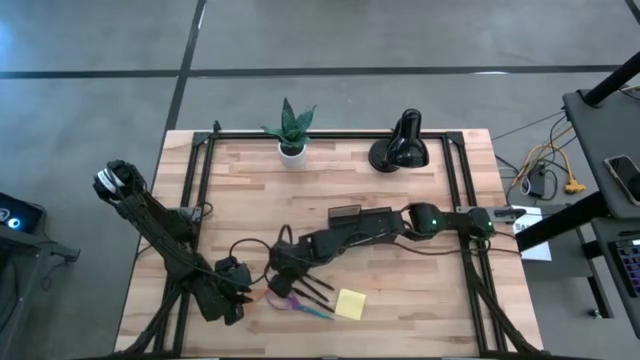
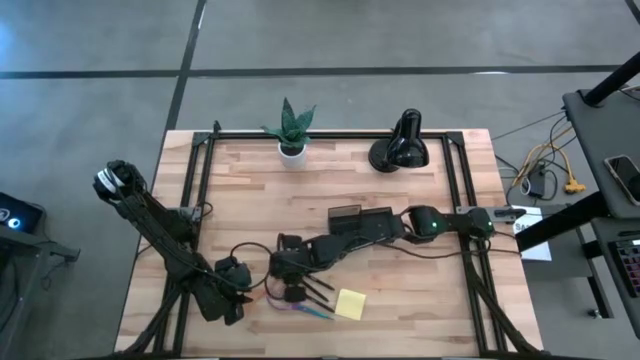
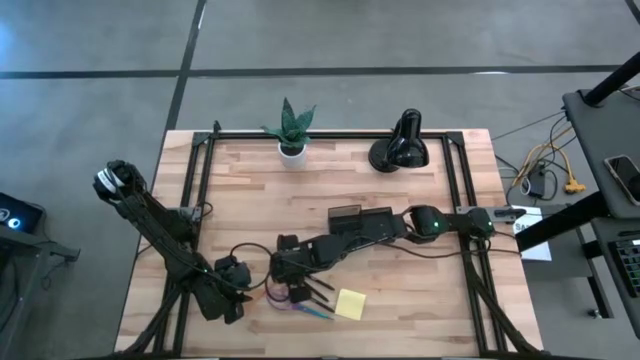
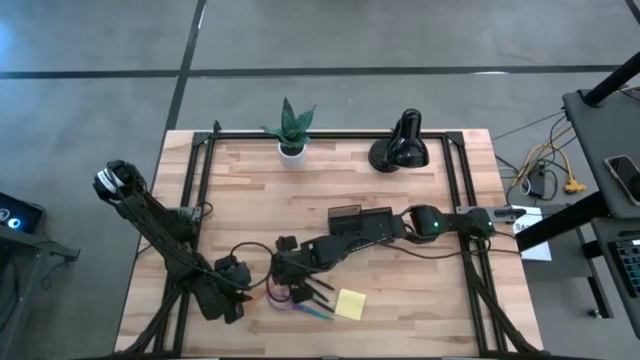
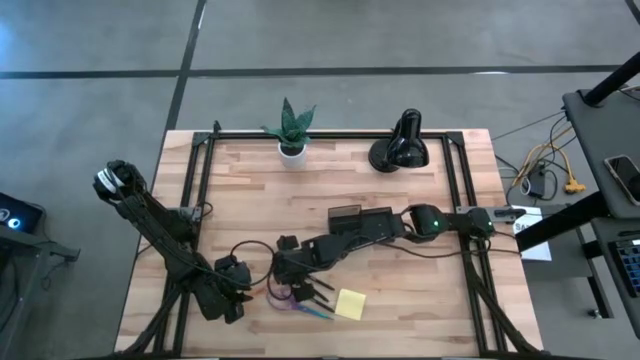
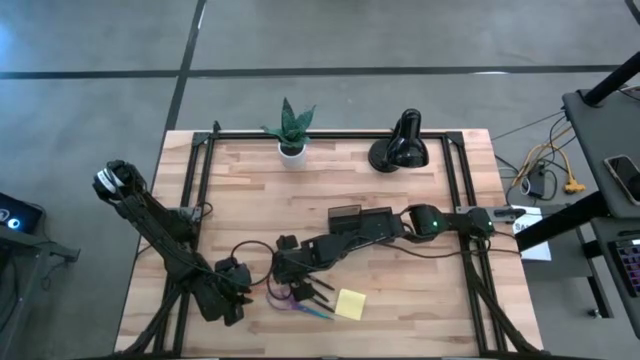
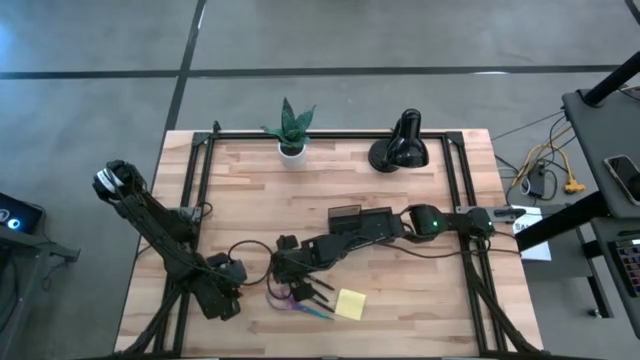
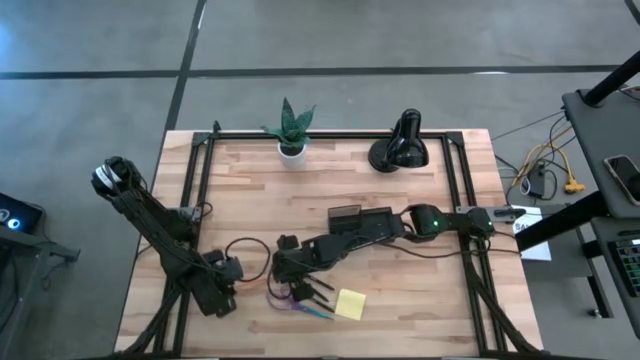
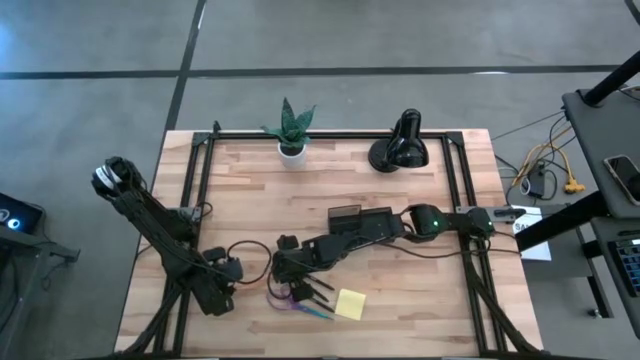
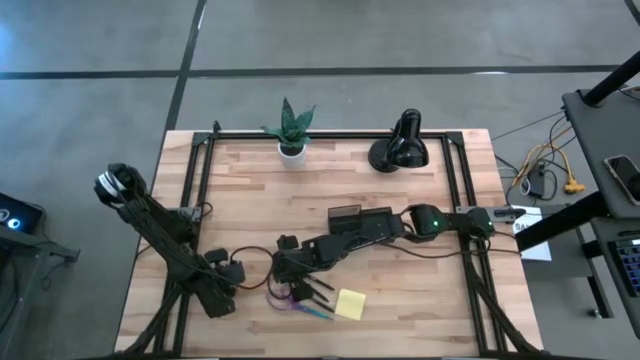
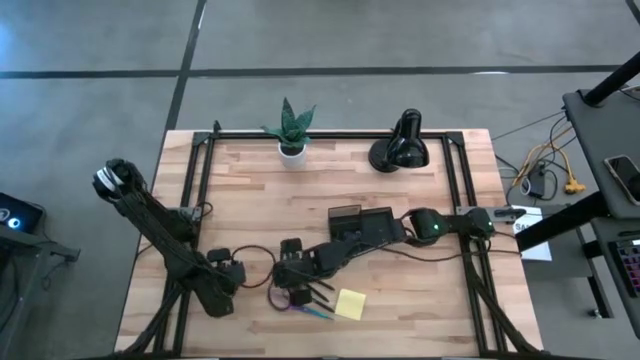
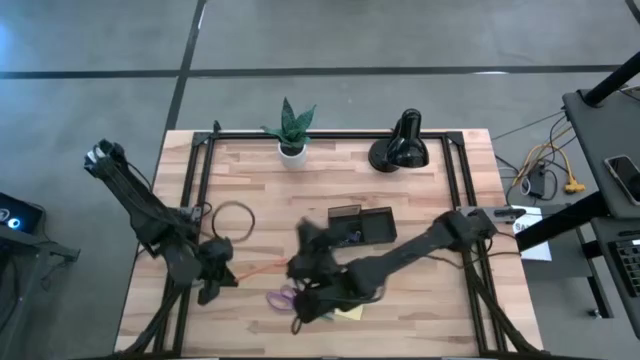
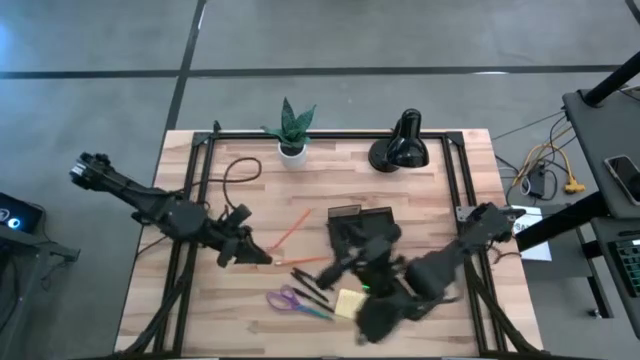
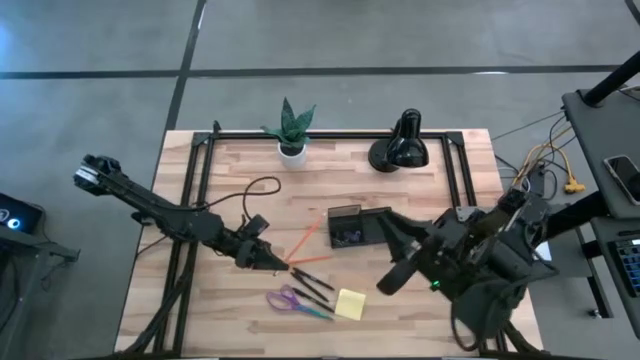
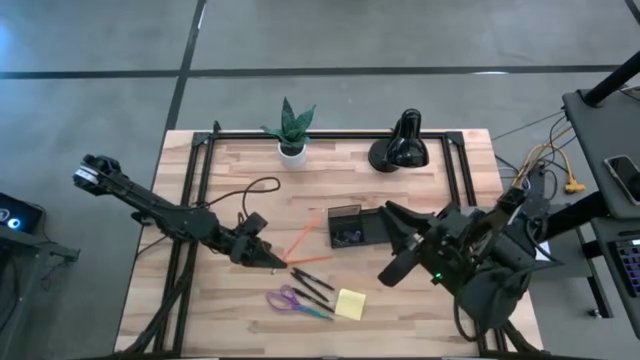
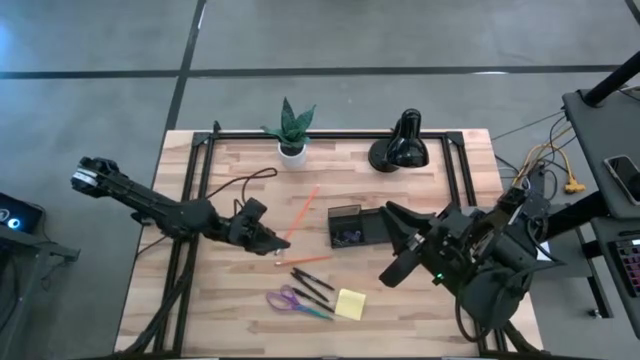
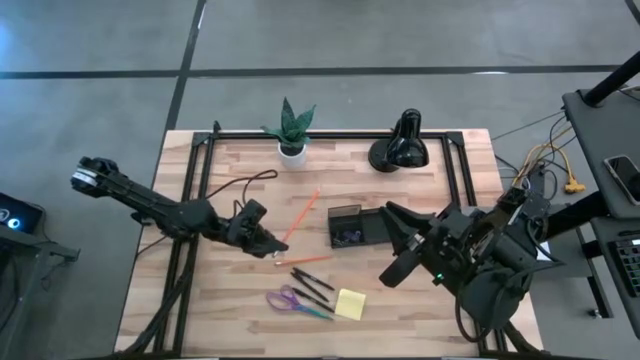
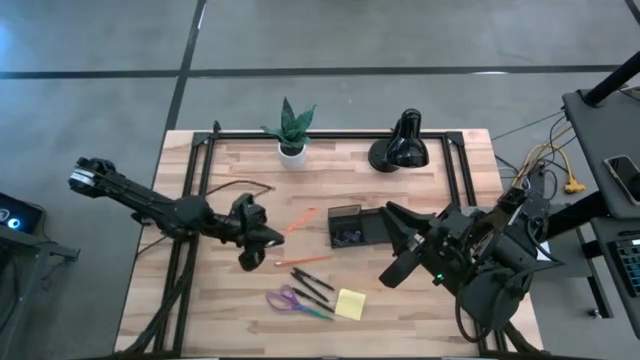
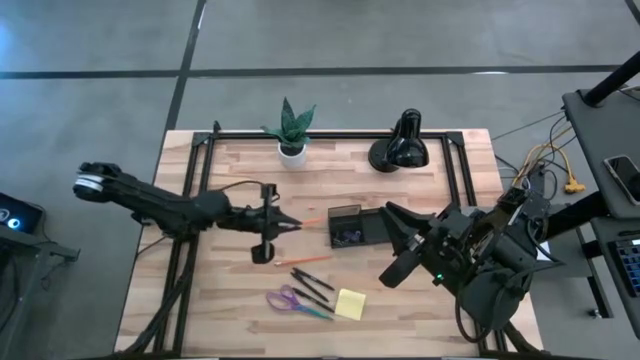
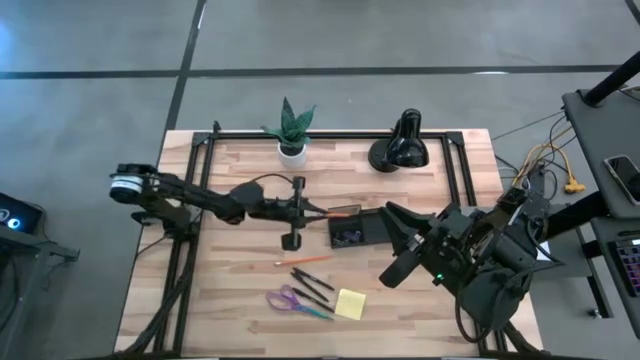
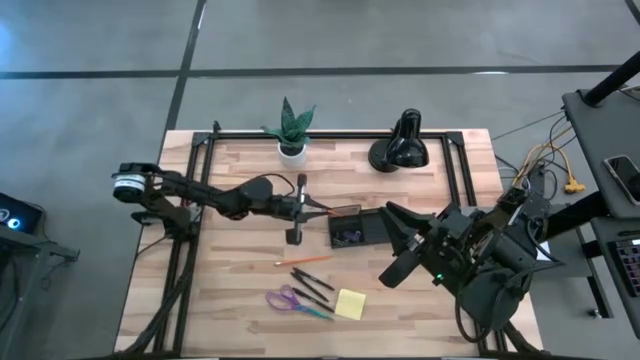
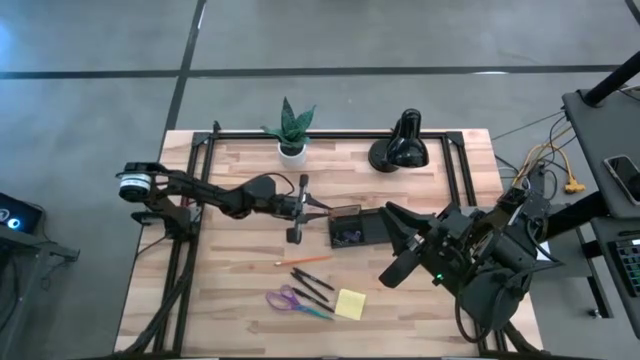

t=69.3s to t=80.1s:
Task: Pick and place office supplies into organizer
Put the left orange pencil into the black desk organizer

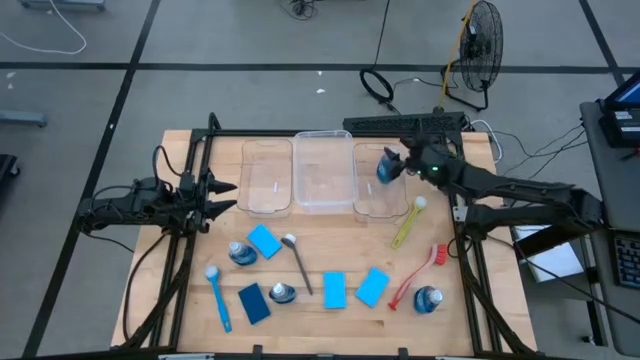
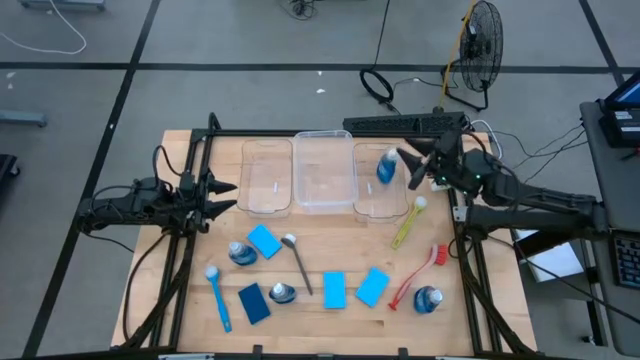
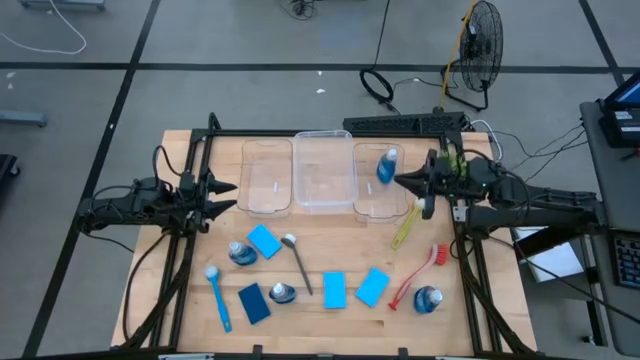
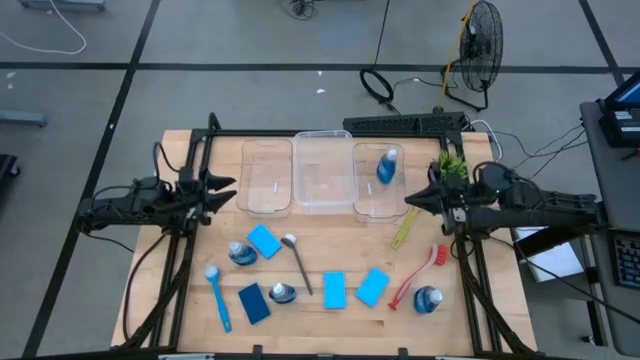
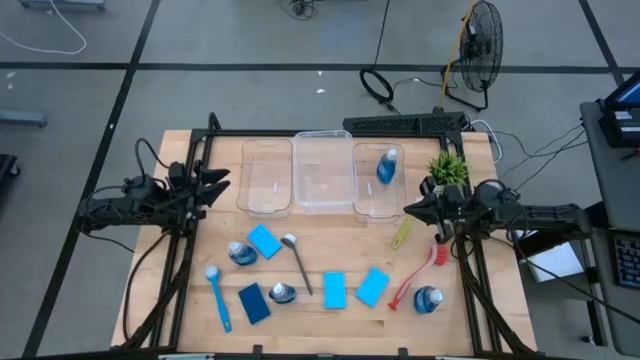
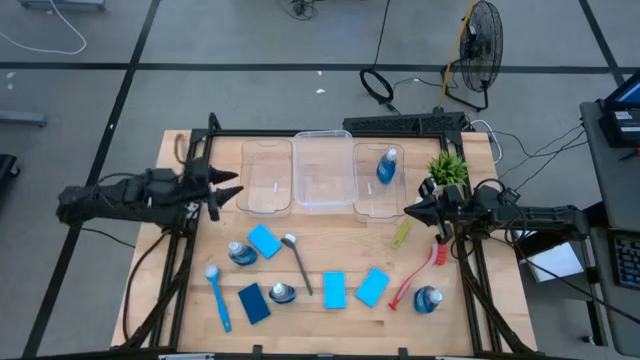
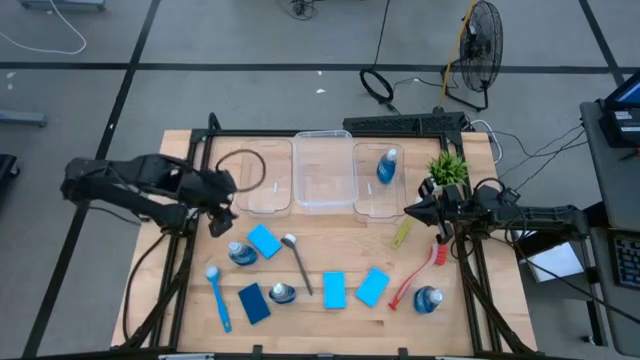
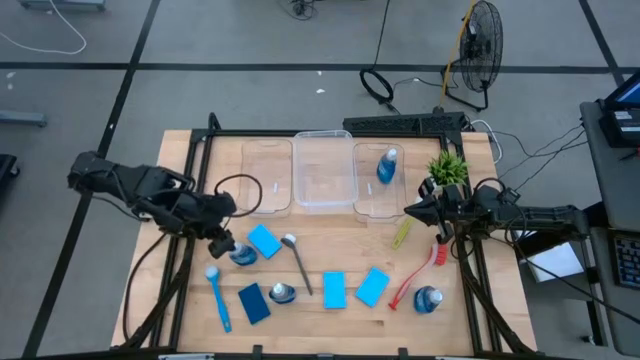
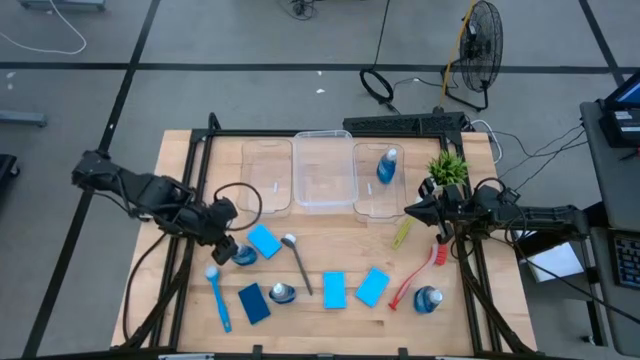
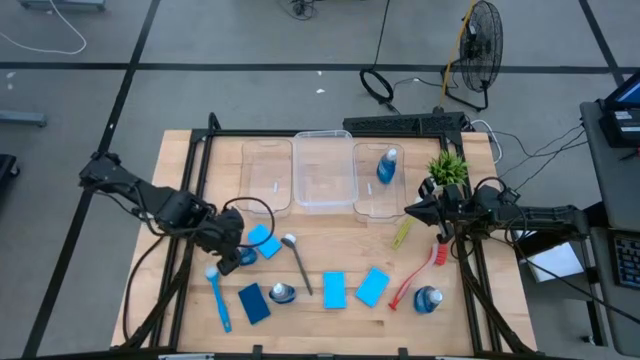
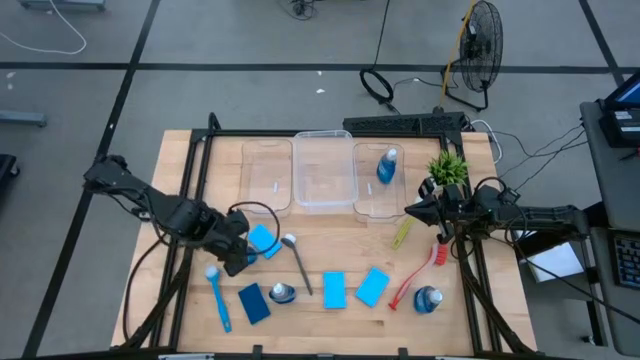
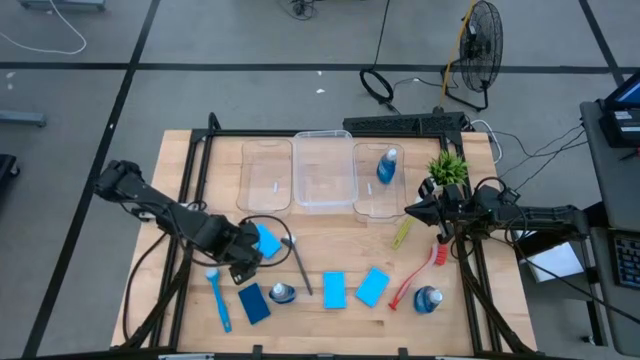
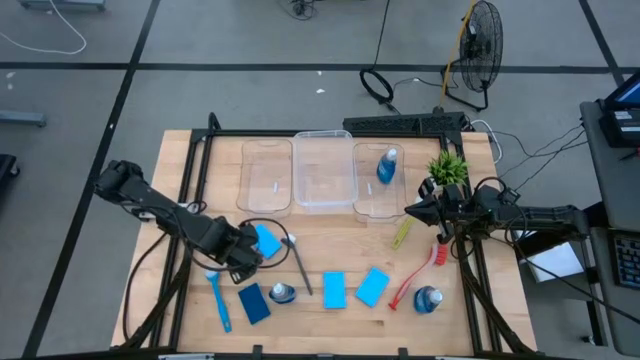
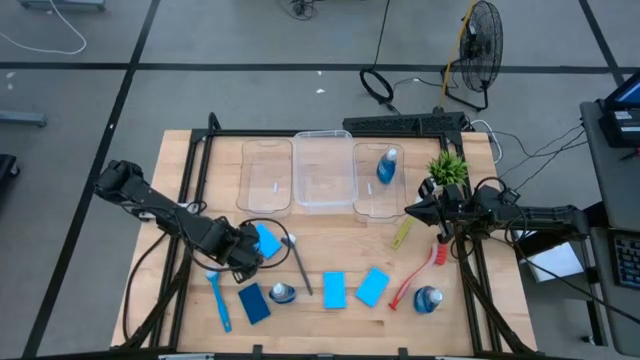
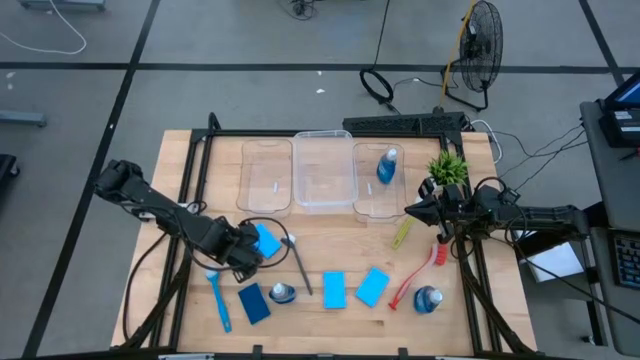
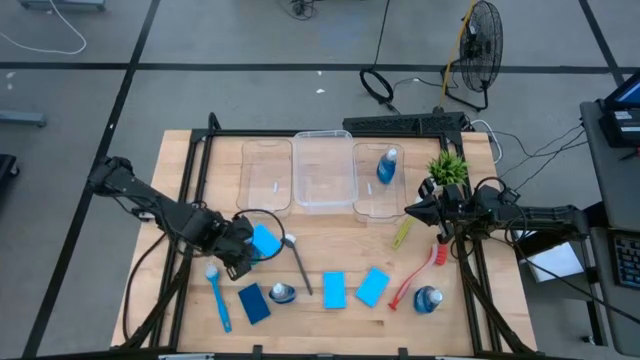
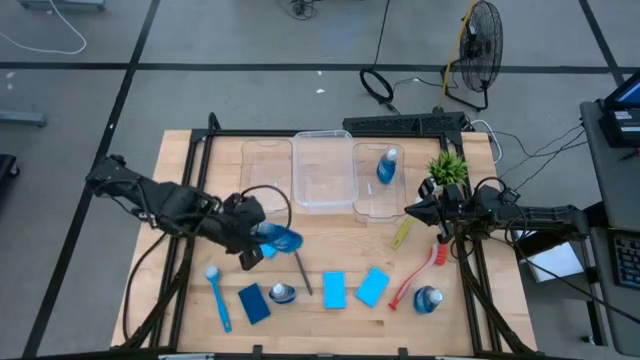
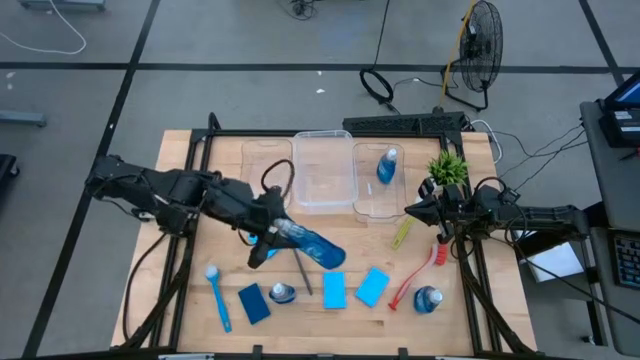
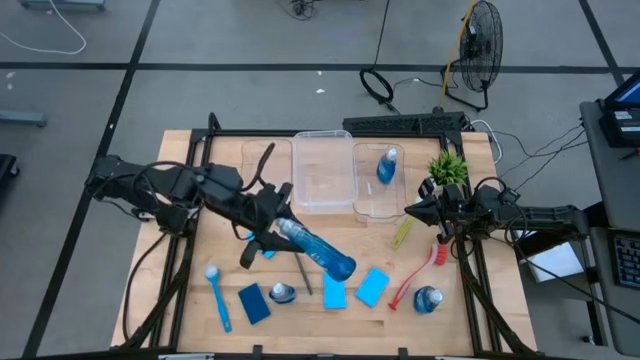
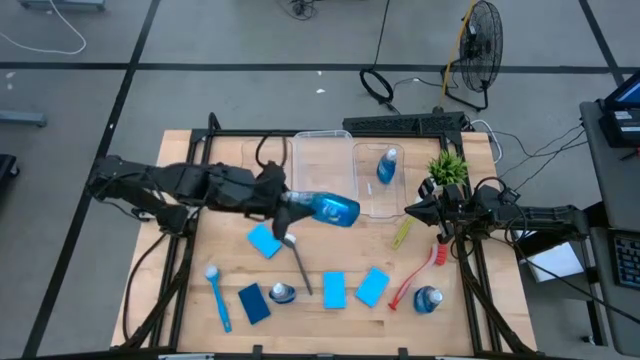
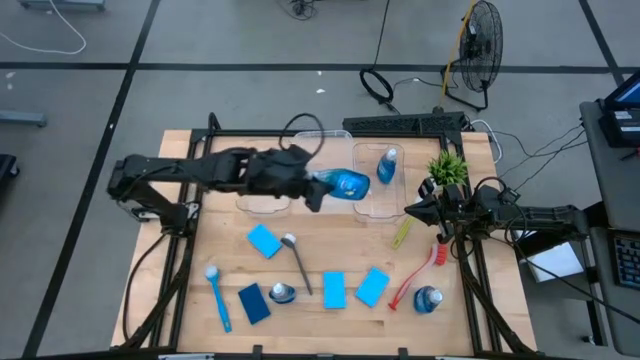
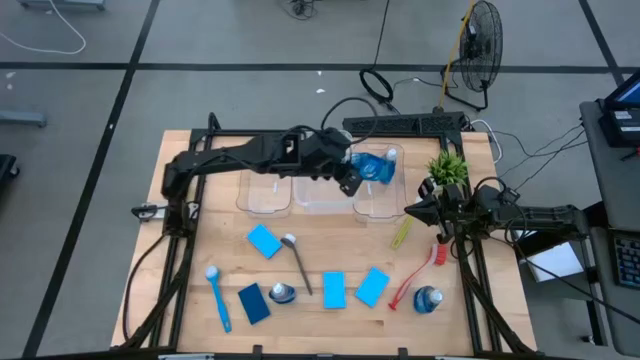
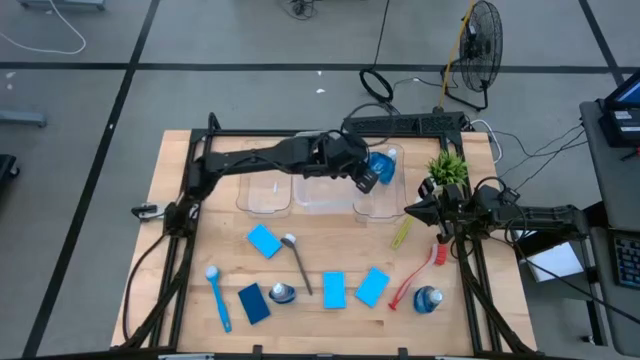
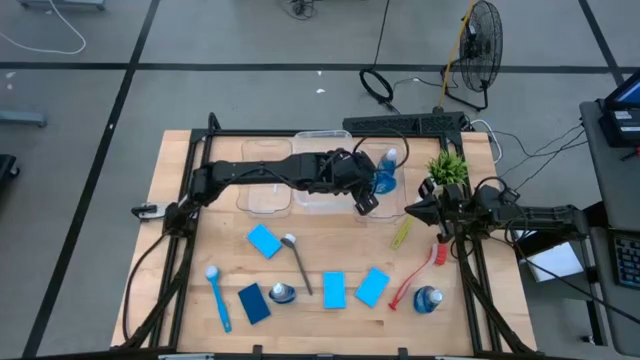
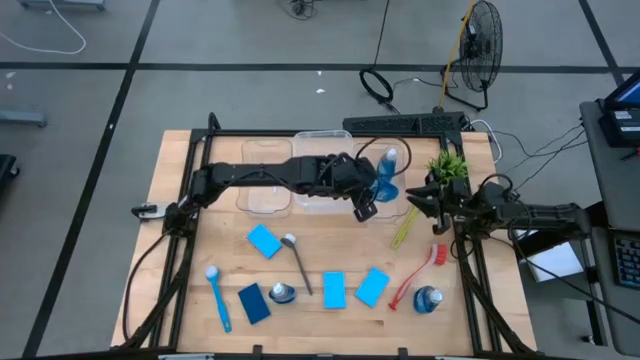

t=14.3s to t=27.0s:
Task: Pick & Place Kitchen Sink Supplies
Put the blue dishwashing liquid bottle into the right transparent bin
